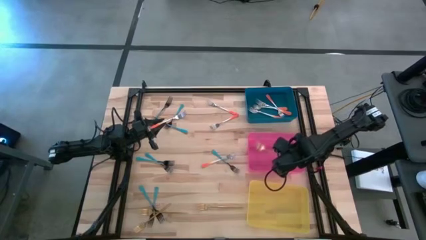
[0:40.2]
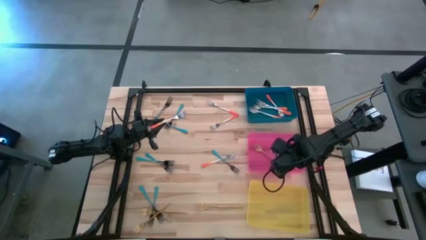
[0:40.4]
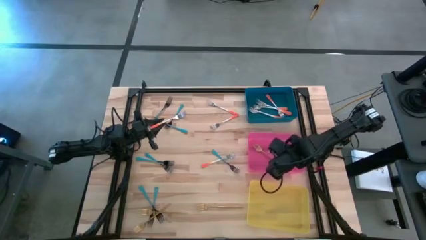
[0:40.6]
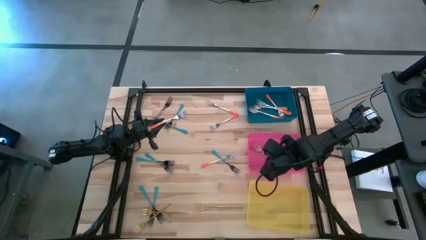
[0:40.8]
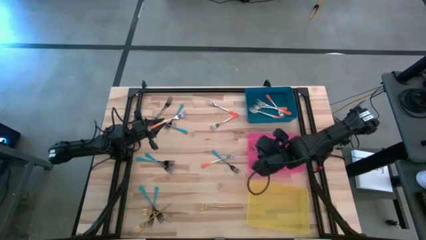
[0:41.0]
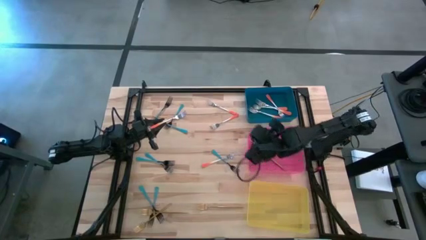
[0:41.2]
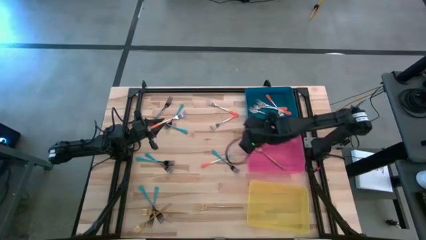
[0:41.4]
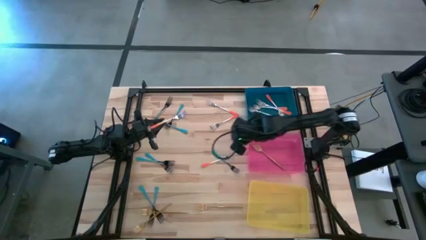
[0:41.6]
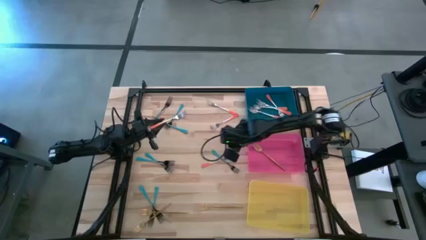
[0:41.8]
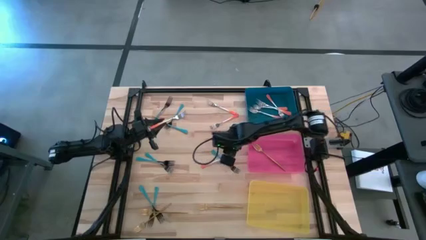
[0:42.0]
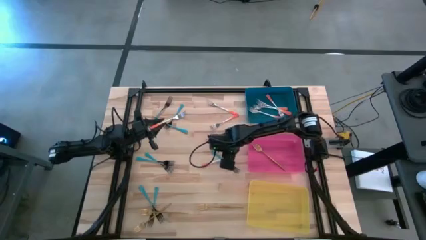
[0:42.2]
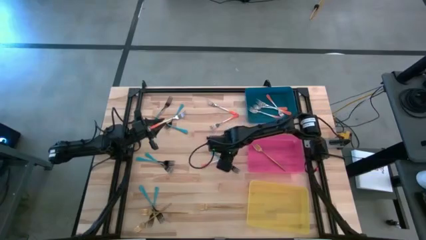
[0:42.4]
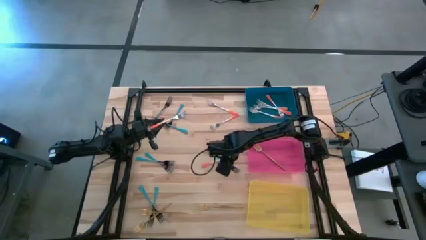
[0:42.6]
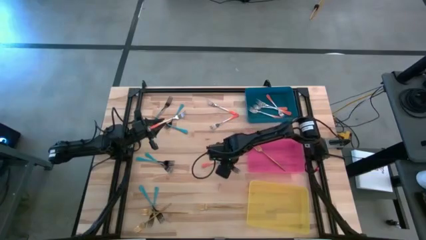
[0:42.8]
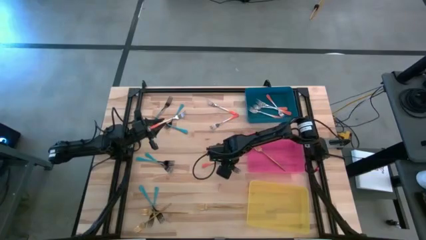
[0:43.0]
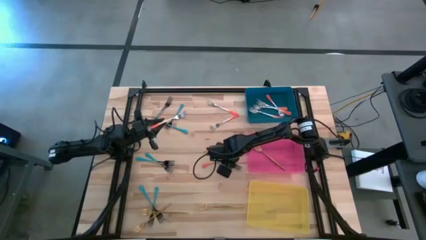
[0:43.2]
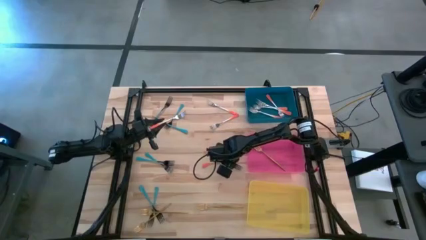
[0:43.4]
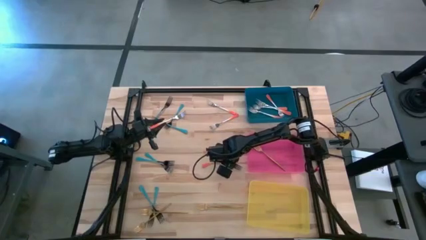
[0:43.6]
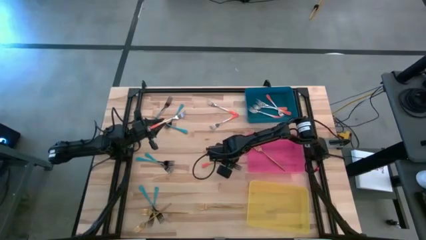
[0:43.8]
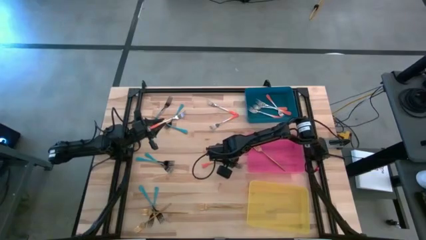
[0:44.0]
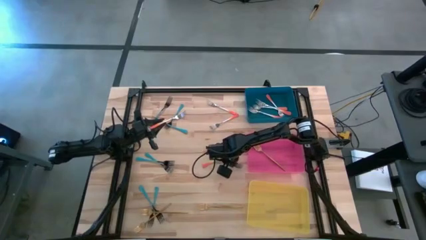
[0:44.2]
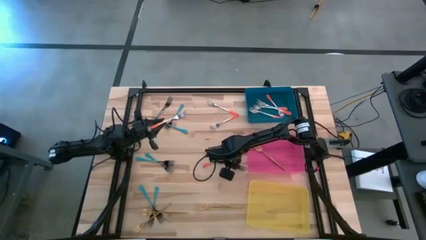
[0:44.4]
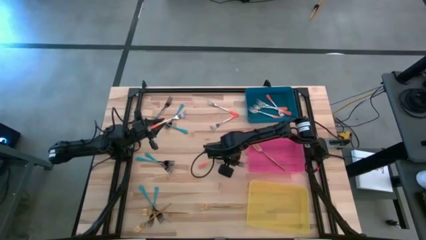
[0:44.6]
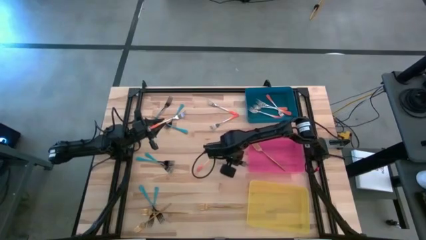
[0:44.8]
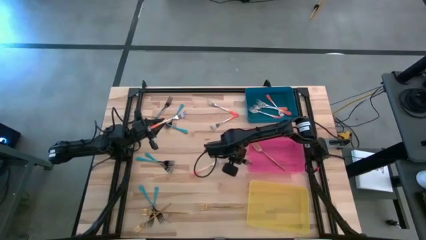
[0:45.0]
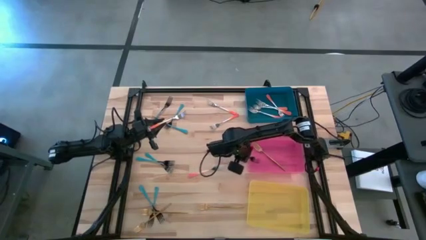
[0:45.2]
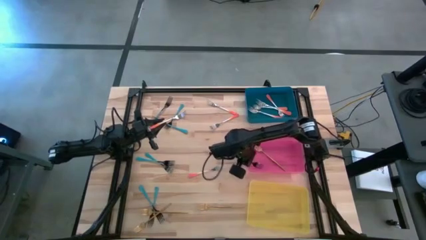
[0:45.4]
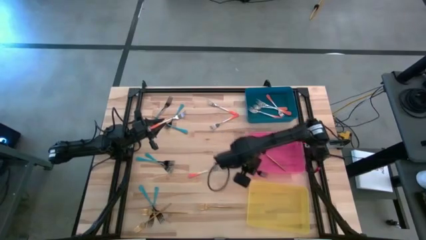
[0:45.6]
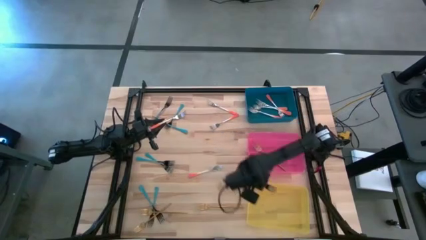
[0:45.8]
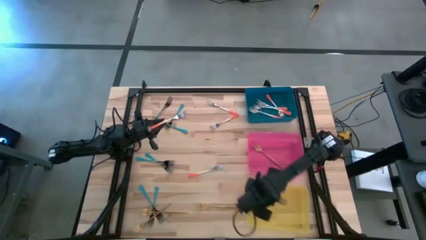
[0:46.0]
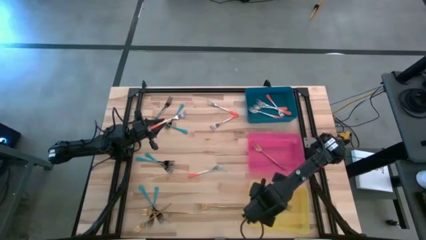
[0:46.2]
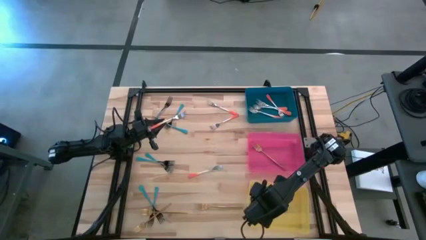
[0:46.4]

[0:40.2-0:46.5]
Task: Sort silverware by color (type)
Put the blue fork into the yellow bin

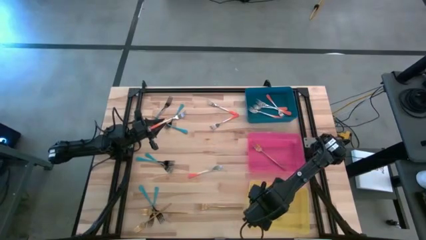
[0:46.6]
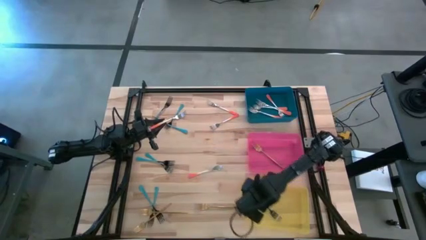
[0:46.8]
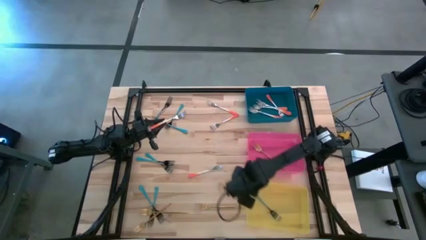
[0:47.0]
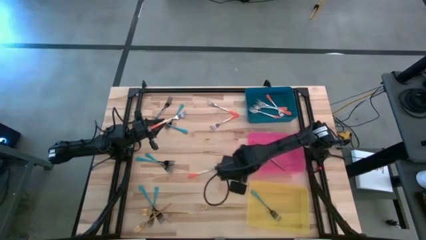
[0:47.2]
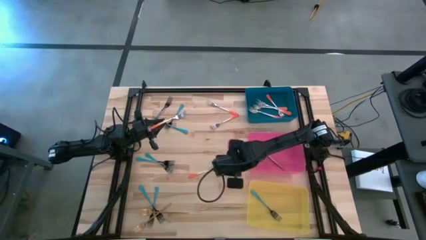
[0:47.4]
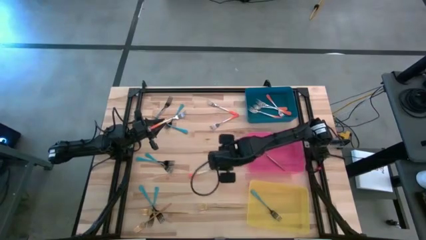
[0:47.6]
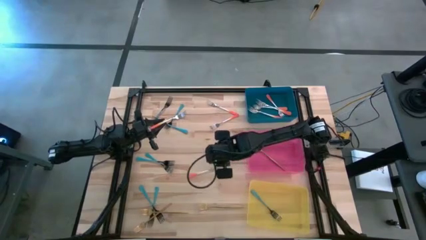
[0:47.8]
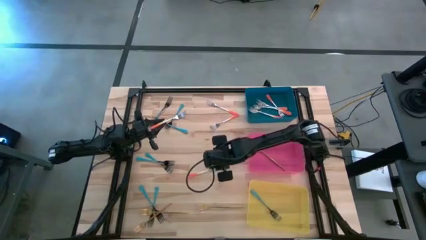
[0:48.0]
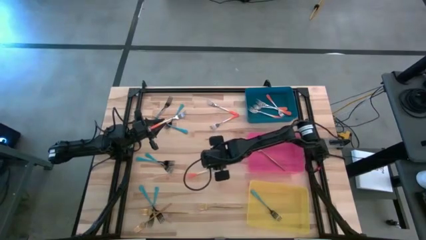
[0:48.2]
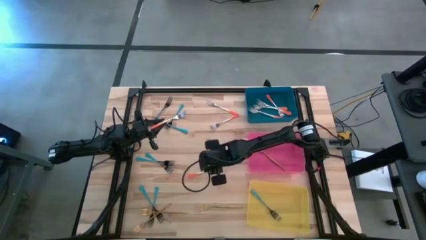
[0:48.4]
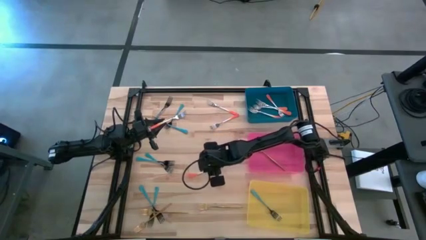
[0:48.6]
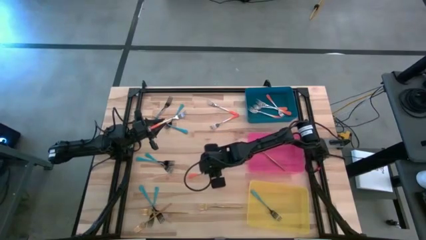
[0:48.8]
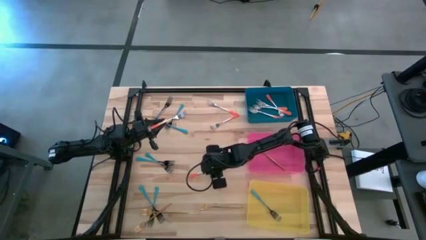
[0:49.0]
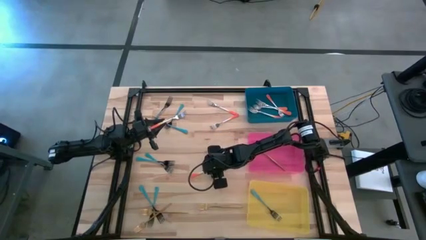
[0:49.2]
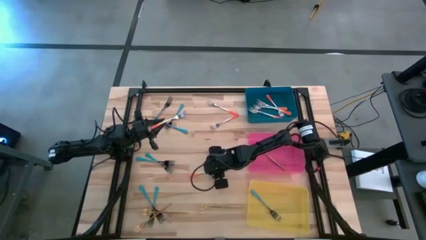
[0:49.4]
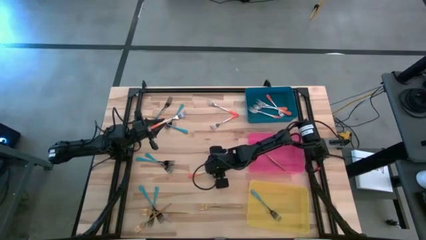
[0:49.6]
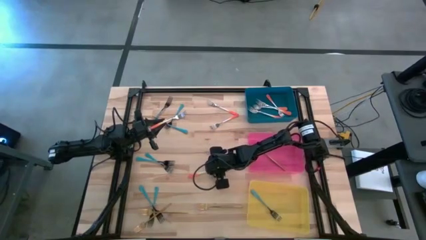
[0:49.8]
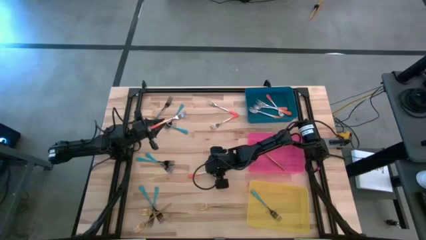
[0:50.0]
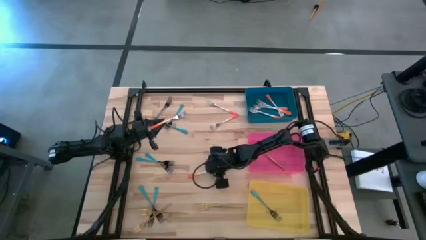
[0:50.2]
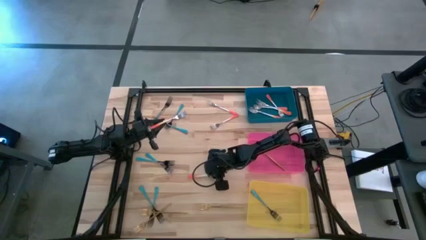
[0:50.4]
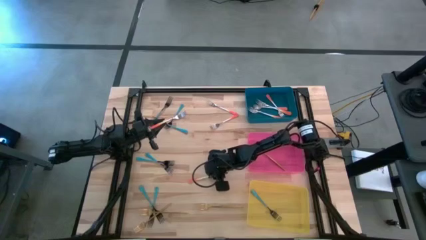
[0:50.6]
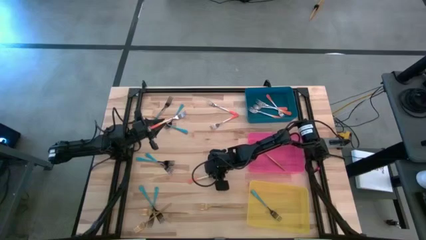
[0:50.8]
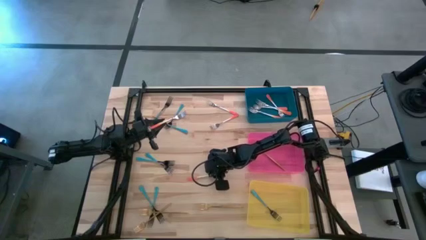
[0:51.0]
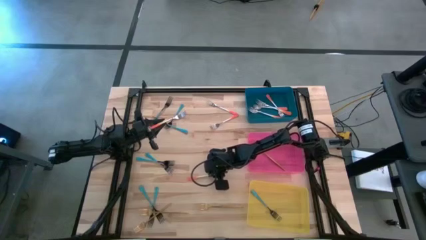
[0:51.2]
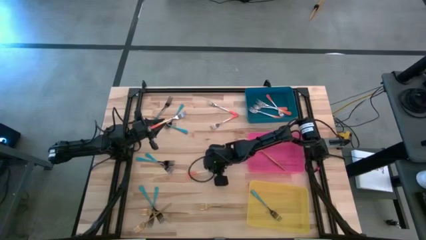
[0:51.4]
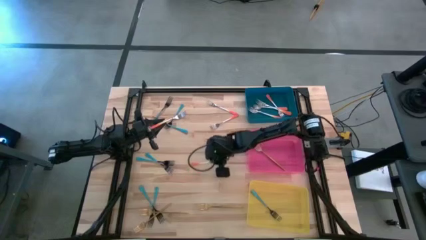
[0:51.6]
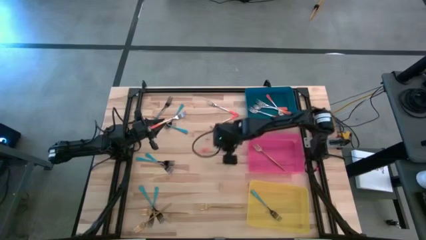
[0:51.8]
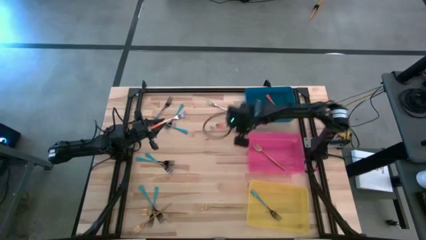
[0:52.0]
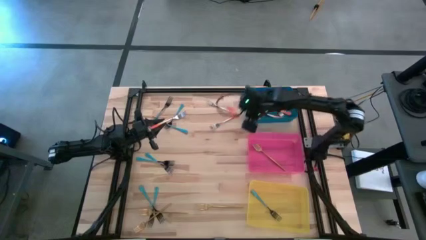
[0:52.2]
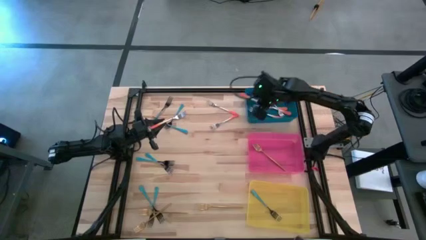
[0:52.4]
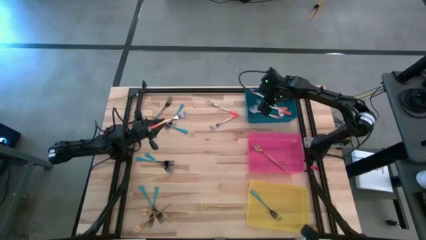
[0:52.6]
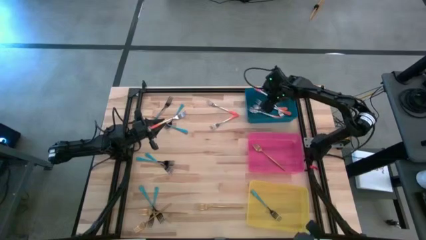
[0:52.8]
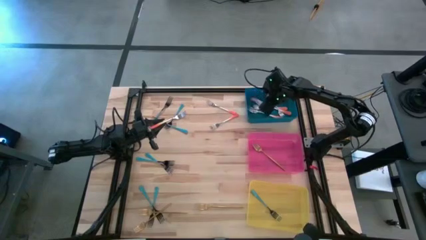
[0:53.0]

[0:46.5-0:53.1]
Put the orange fork into the blue bin

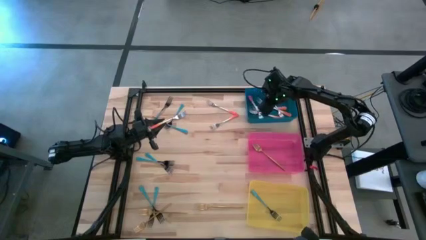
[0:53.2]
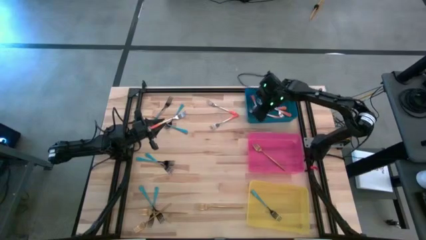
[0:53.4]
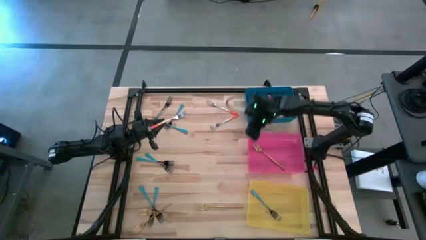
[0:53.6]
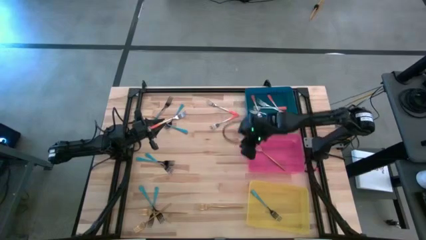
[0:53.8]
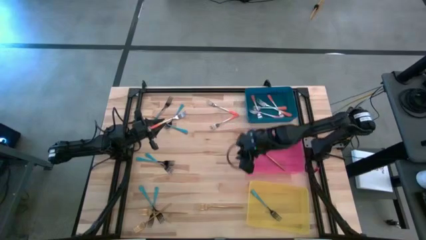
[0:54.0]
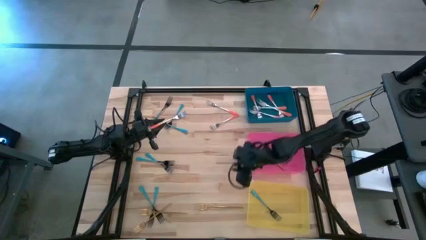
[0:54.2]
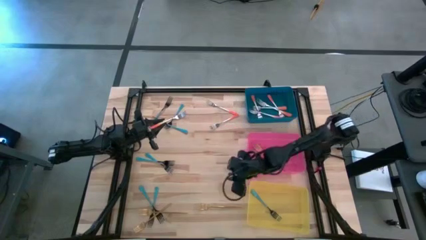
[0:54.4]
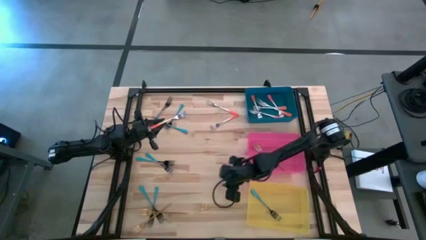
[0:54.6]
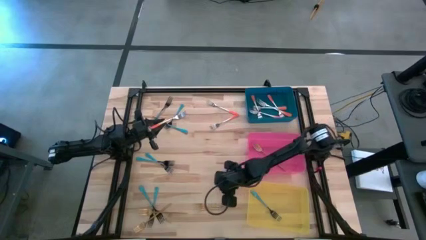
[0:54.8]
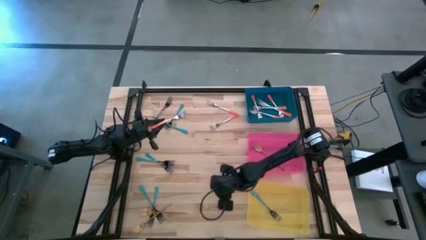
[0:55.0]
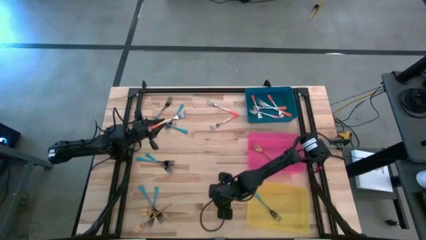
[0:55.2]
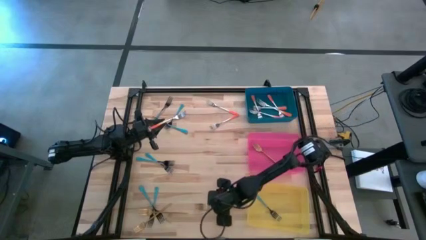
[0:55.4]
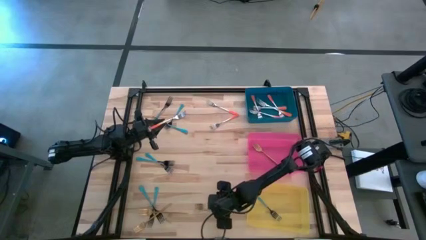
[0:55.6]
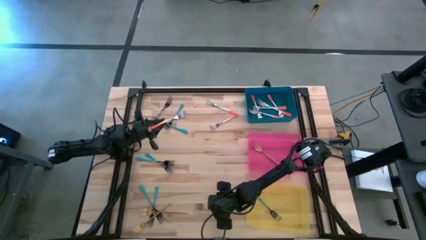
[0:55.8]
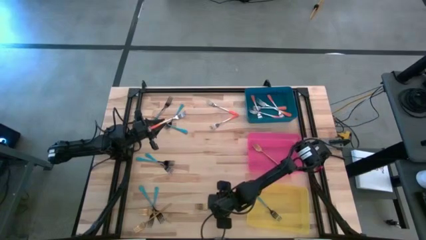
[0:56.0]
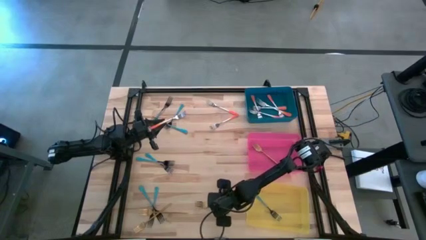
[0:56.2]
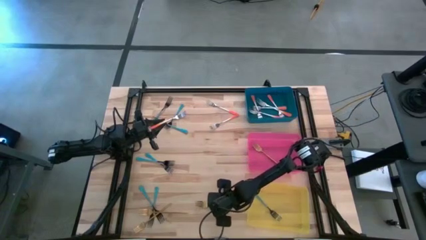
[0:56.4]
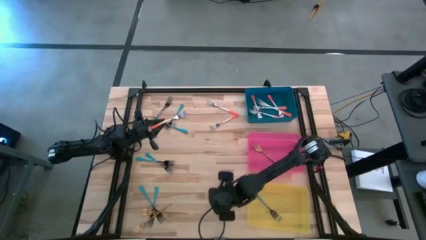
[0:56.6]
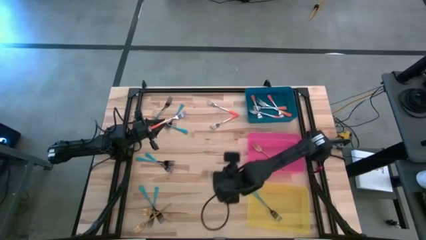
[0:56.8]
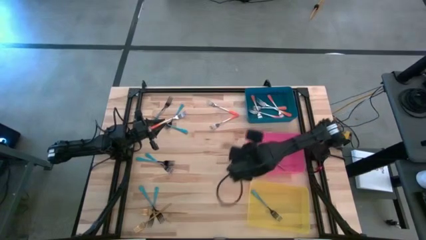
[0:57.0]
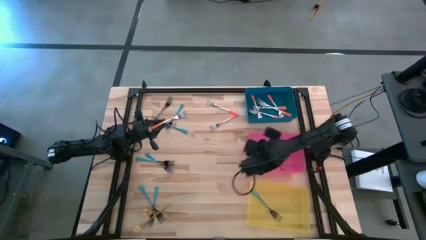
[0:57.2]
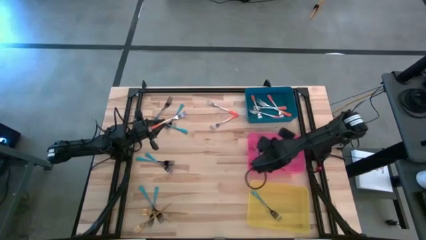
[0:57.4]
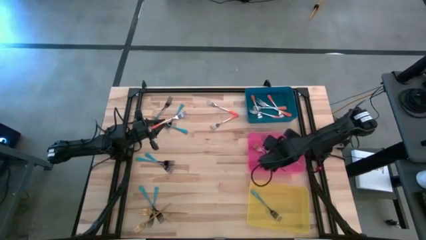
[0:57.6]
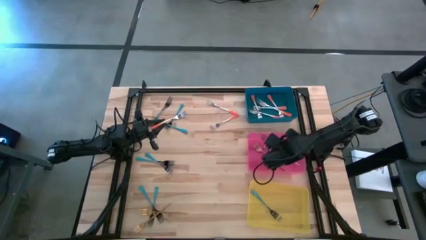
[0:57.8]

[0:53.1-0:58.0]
Put the gold fork into the pink bin

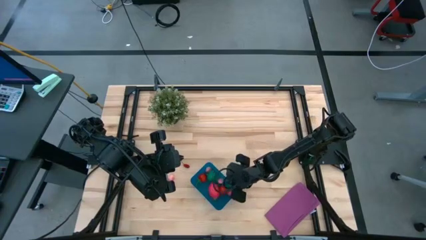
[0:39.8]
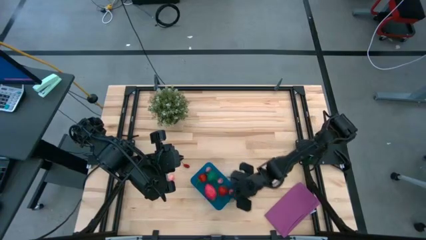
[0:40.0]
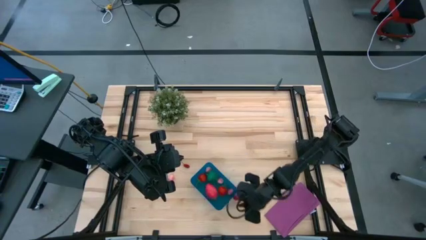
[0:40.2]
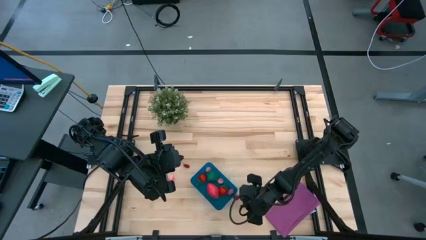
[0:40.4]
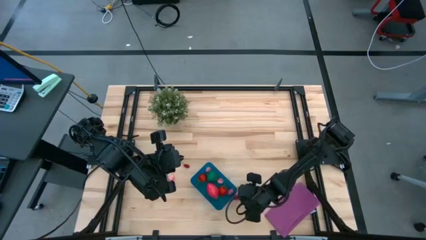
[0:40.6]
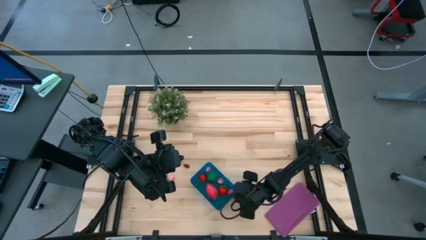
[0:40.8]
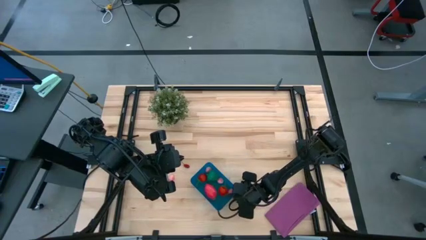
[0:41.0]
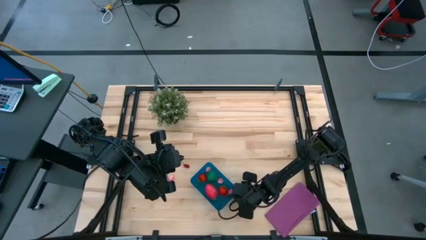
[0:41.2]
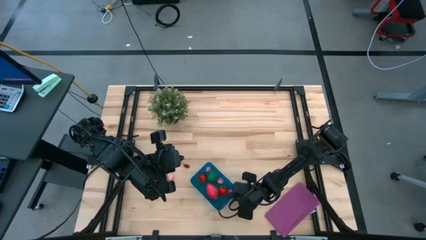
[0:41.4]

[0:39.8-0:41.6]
Task: Pick and placing Produce into tupperware
Put the red cherry into the blue bin
